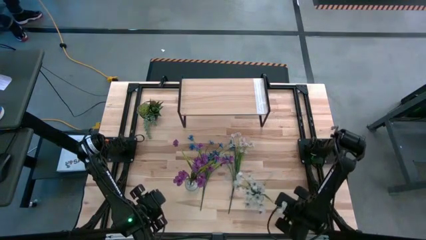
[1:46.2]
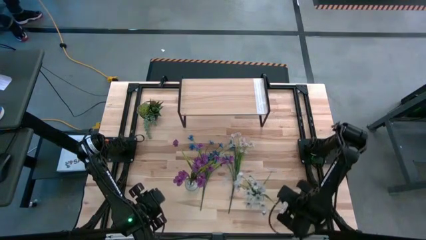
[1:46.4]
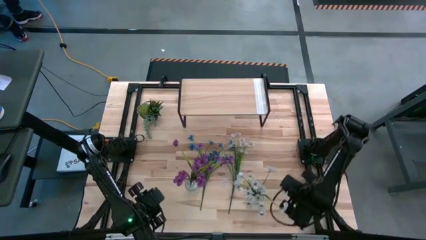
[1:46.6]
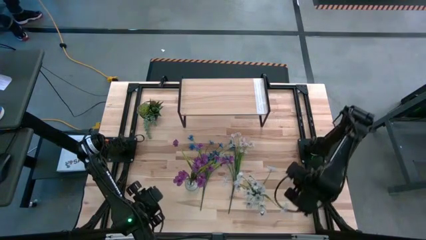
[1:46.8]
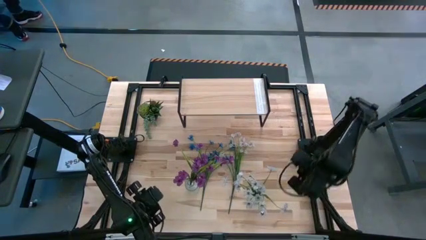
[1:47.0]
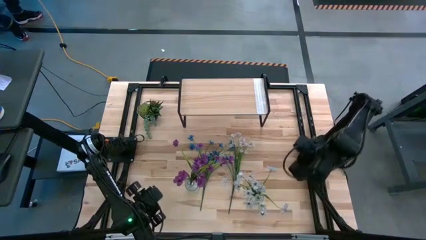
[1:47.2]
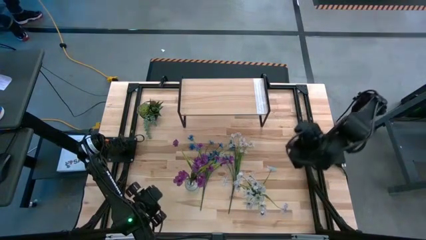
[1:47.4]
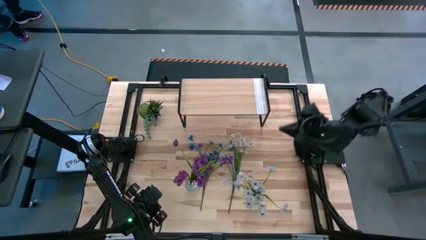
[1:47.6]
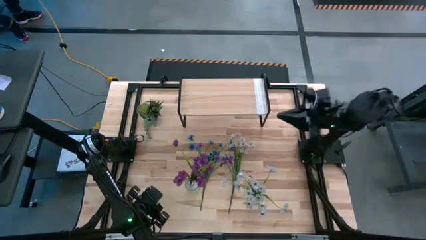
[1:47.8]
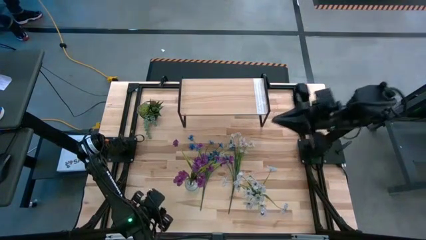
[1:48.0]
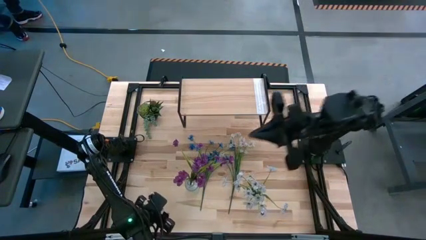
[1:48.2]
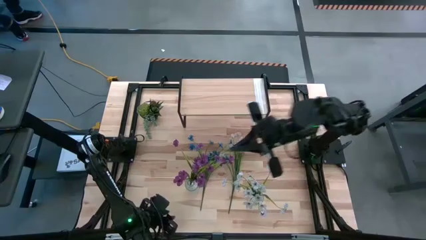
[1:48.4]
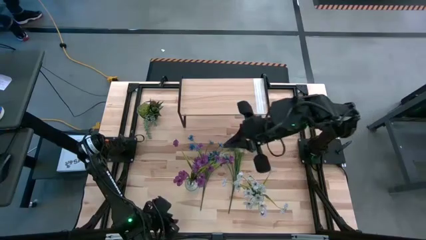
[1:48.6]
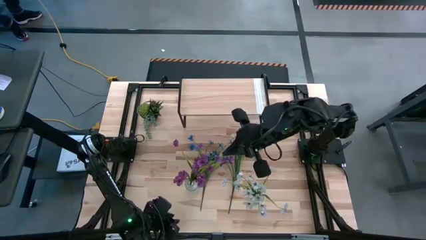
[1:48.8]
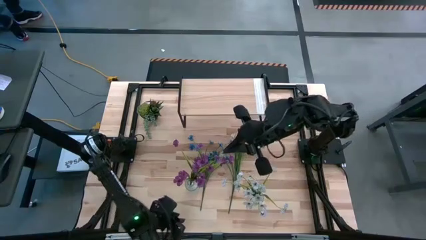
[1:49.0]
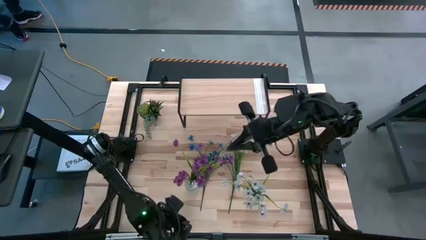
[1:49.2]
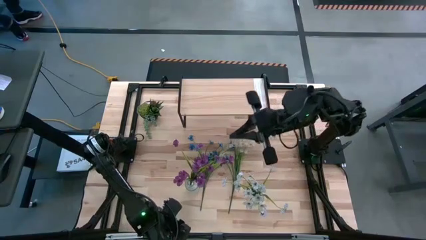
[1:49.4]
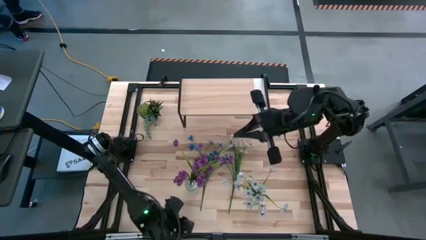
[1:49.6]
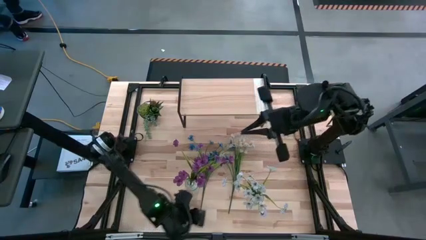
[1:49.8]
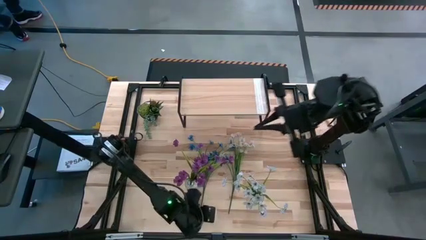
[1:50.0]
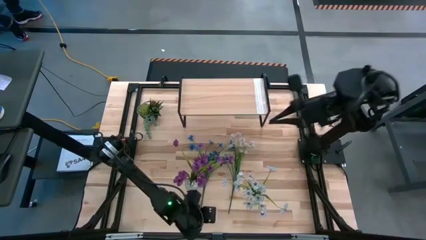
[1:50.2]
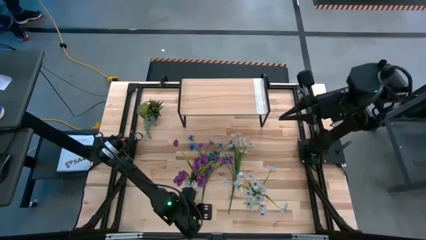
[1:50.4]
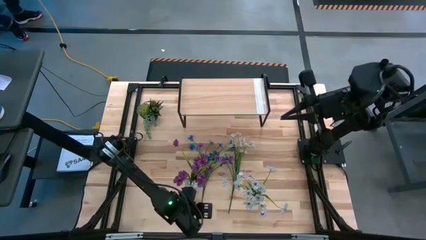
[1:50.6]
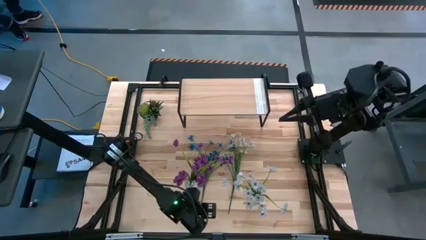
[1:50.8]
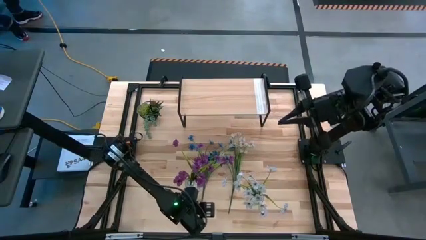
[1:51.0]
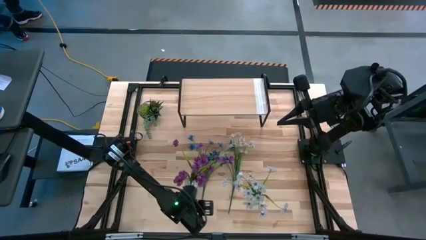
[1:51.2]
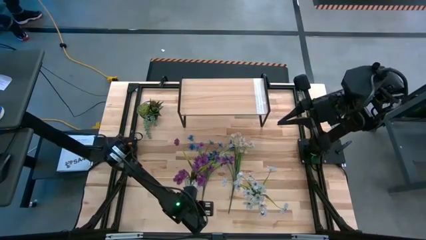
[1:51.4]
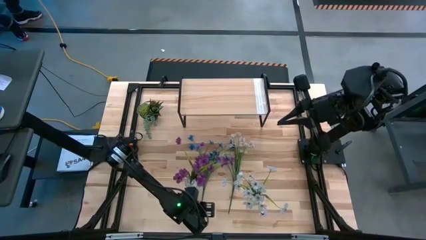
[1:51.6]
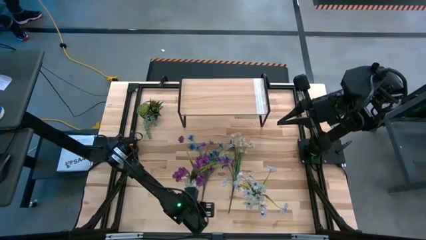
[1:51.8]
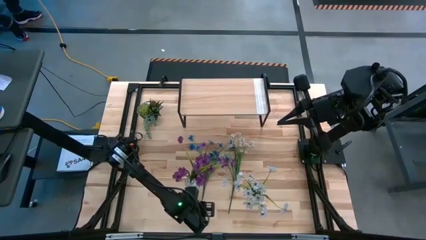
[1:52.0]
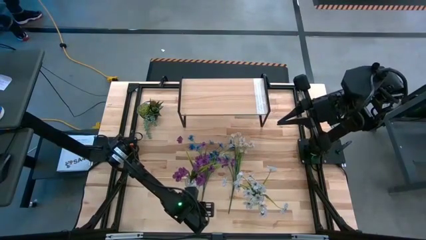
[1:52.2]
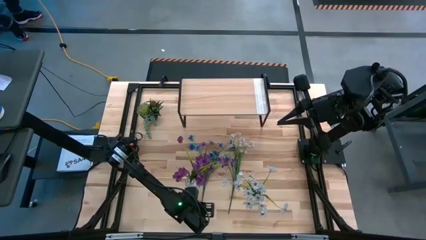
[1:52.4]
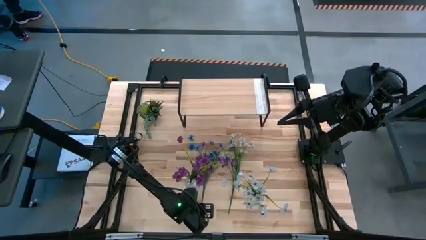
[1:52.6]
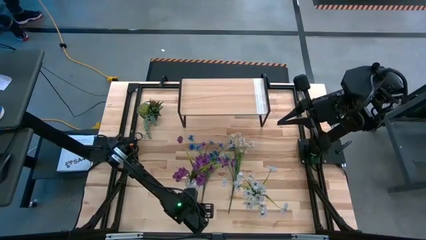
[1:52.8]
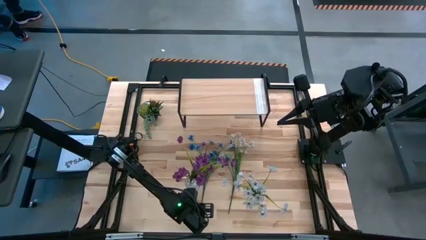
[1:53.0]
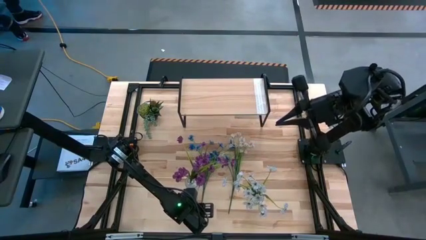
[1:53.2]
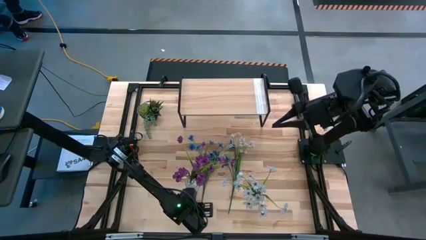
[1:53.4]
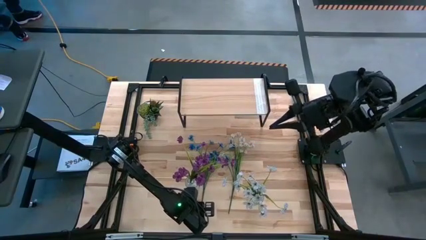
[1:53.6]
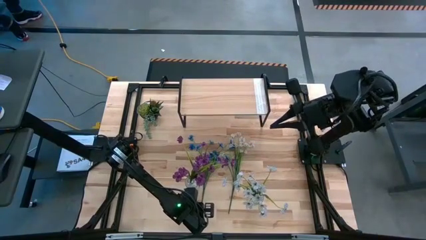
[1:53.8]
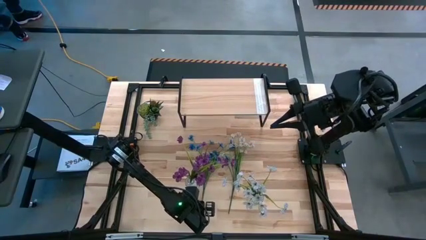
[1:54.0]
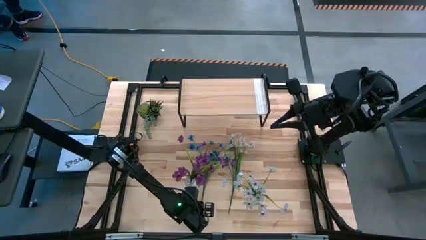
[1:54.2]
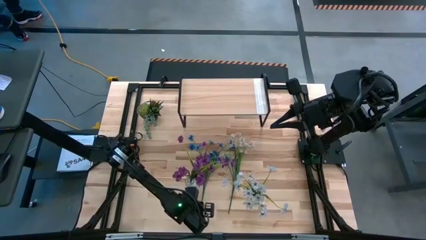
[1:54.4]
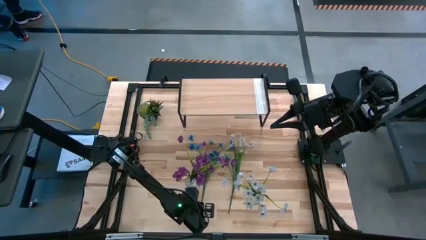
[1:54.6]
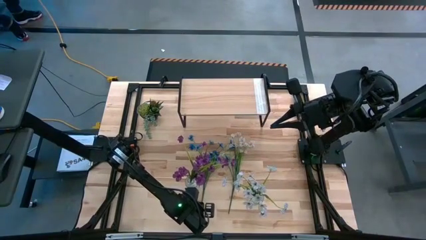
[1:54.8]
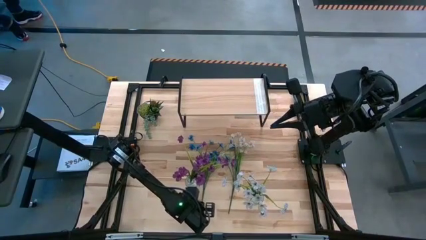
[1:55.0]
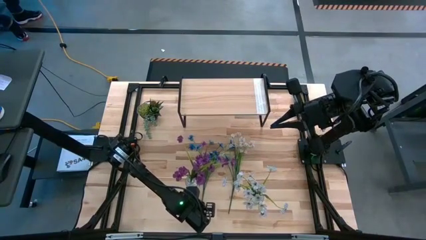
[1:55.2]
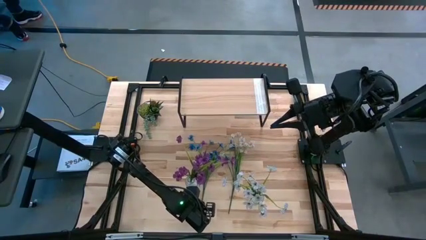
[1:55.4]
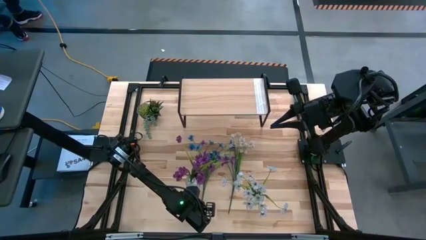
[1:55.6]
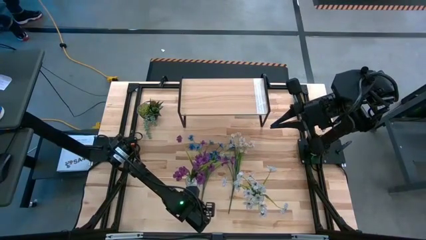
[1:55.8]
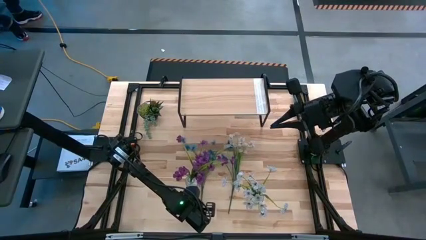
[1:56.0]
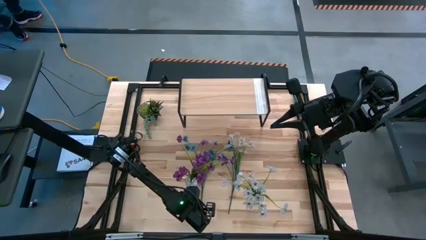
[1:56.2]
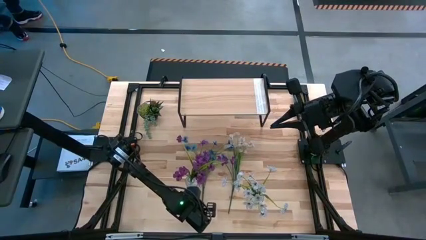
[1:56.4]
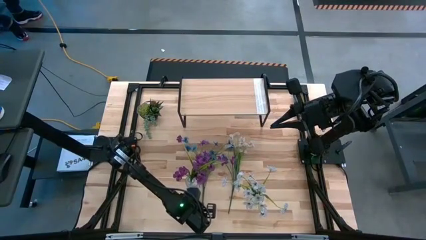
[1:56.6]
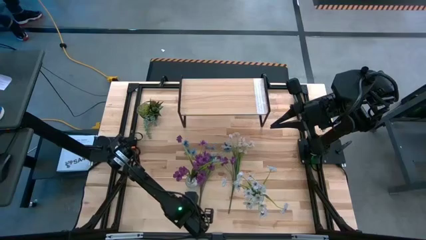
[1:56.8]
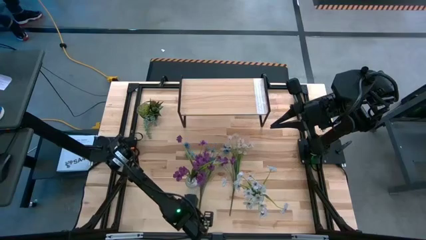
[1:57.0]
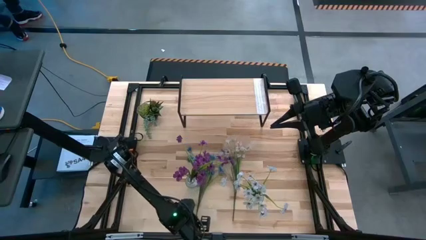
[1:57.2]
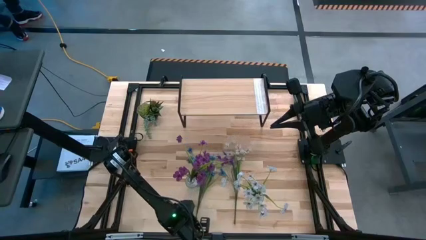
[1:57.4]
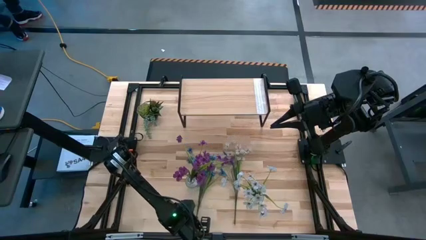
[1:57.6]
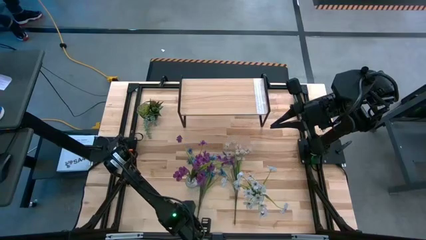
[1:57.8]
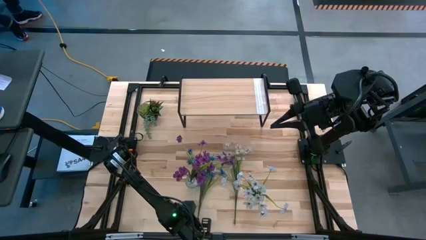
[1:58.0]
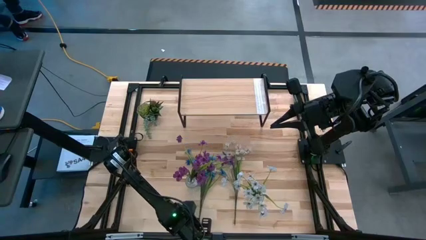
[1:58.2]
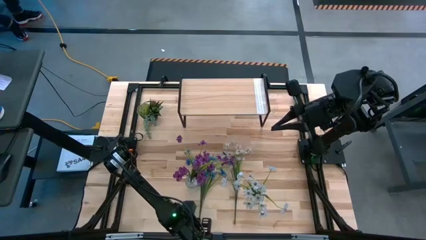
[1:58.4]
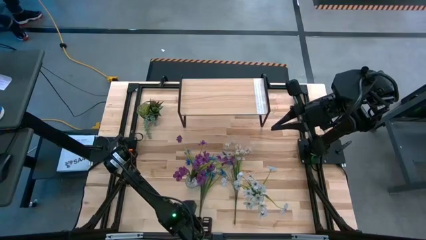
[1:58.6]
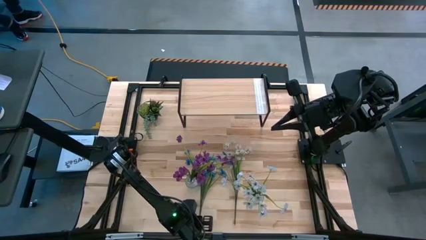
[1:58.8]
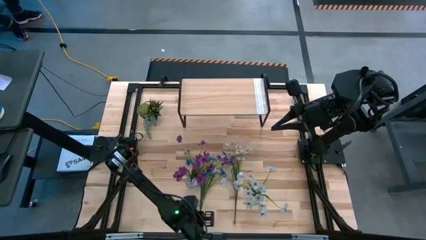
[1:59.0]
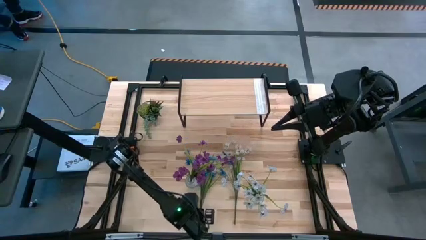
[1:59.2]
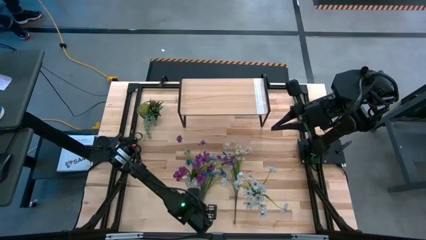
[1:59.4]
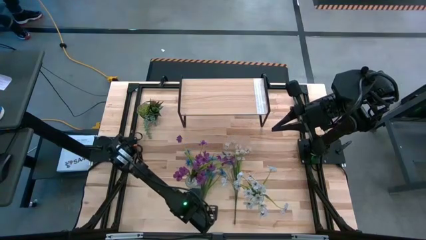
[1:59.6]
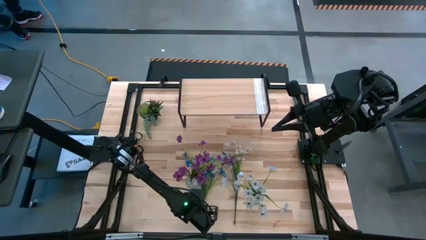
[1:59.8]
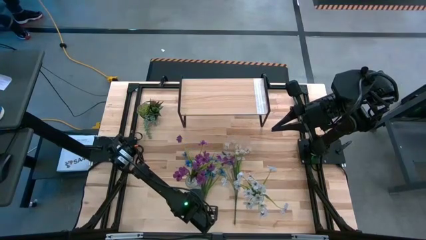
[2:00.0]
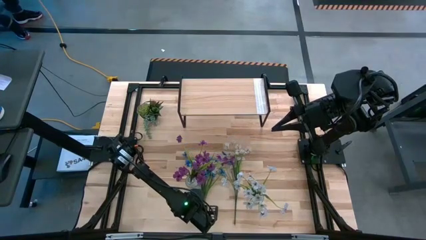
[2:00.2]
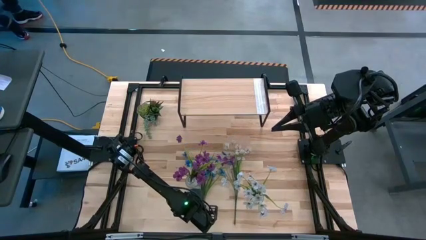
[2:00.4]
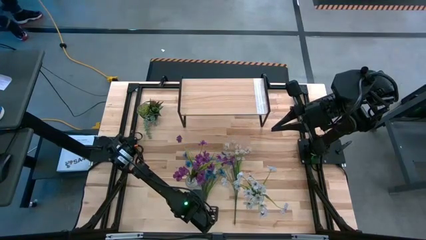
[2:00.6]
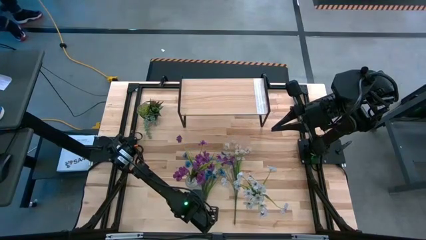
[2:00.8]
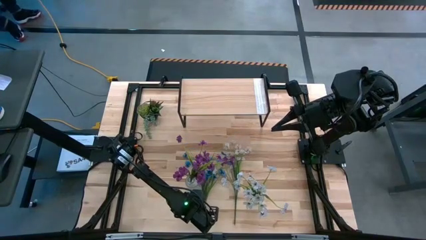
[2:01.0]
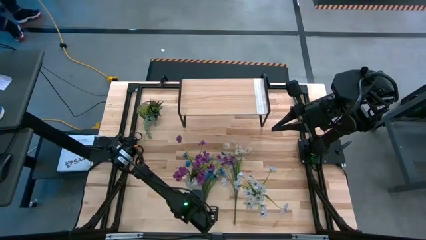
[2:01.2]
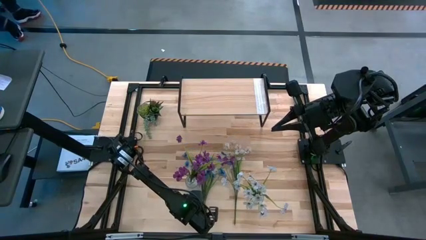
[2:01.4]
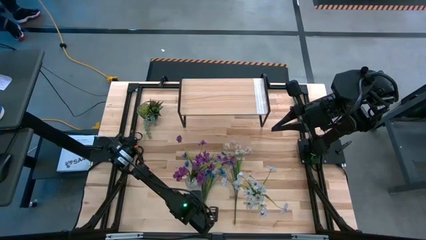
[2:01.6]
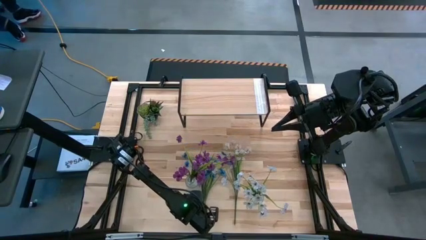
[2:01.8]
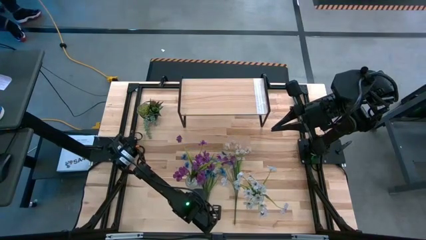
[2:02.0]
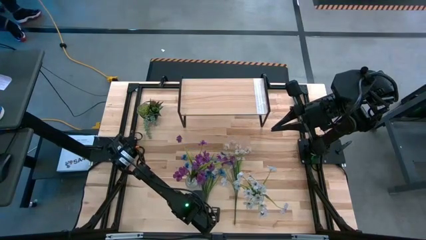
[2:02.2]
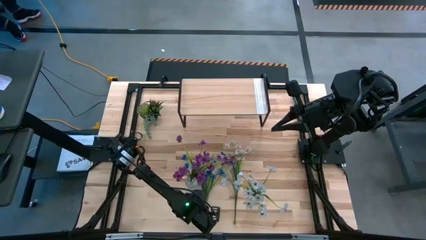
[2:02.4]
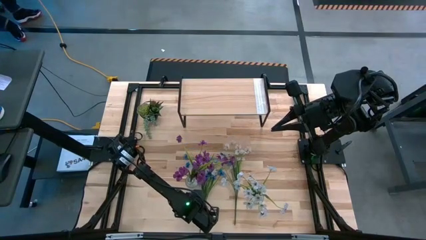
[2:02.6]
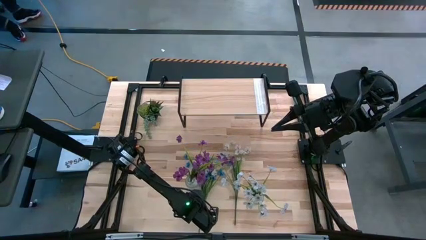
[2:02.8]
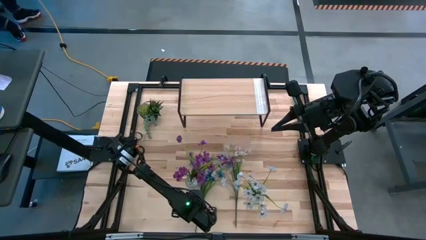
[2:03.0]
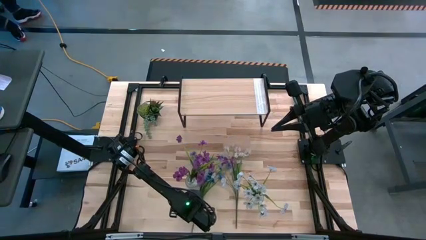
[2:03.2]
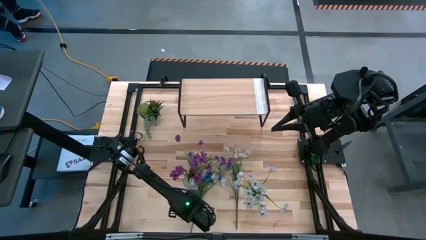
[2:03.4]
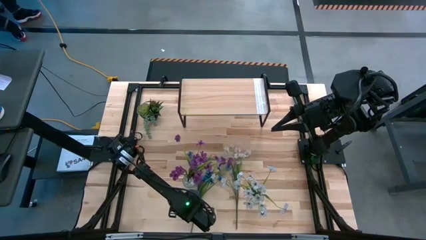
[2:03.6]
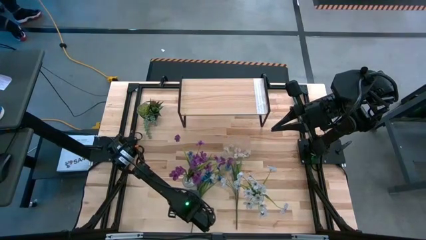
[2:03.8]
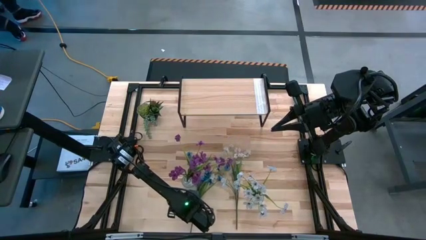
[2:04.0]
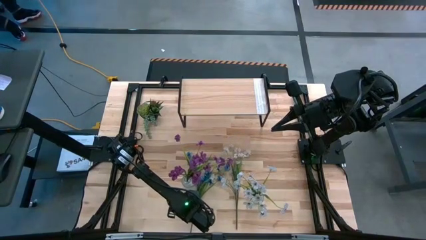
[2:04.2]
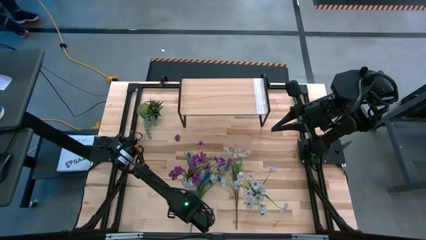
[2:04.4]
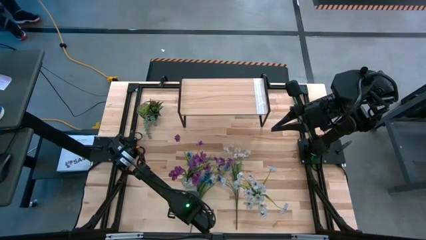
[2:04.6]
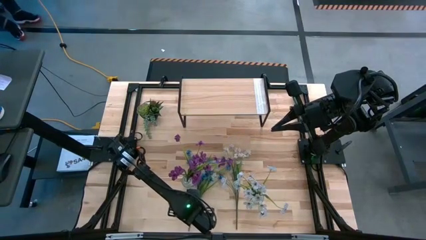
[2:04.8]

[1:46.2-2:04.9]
Task: Pick and place flowers into a vace then onto a shelf
Put the blue flowers into the left transparent vase
